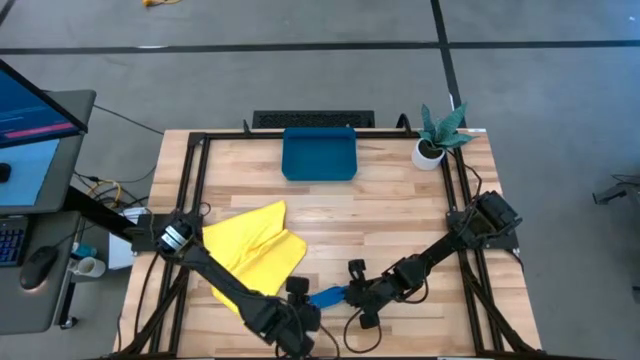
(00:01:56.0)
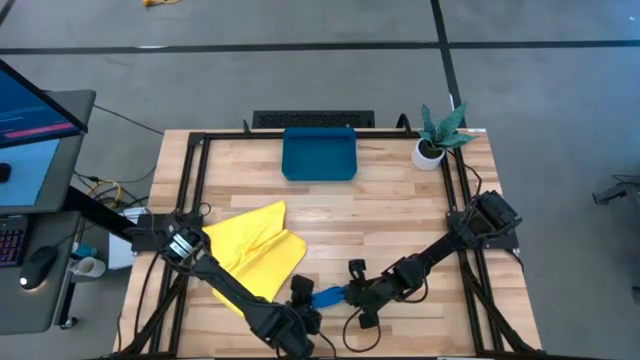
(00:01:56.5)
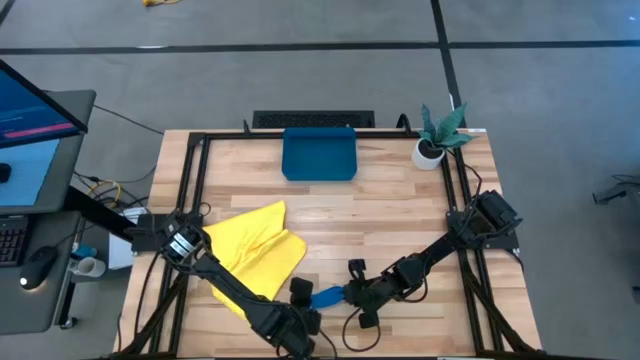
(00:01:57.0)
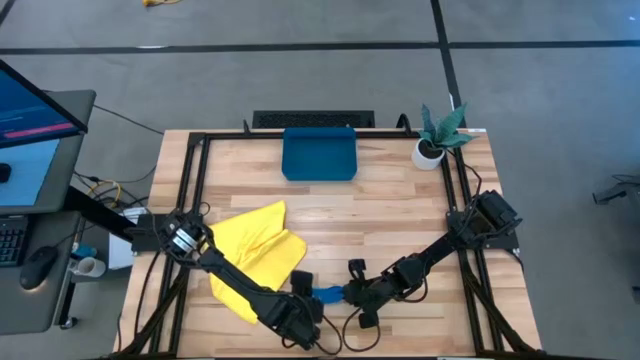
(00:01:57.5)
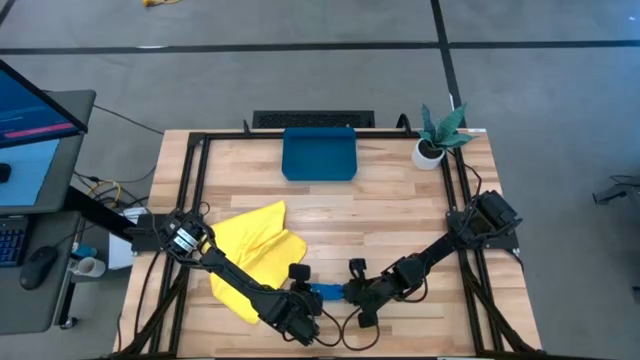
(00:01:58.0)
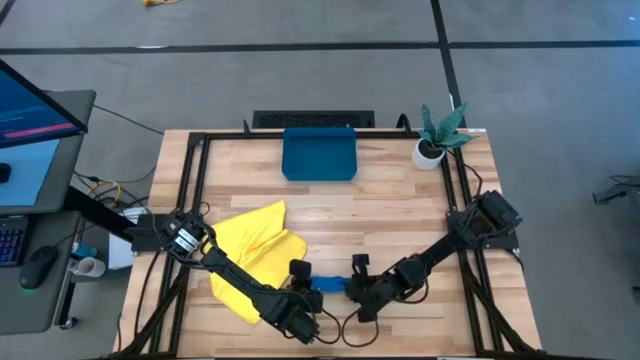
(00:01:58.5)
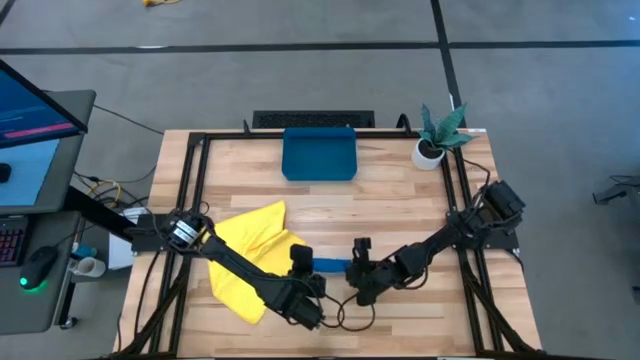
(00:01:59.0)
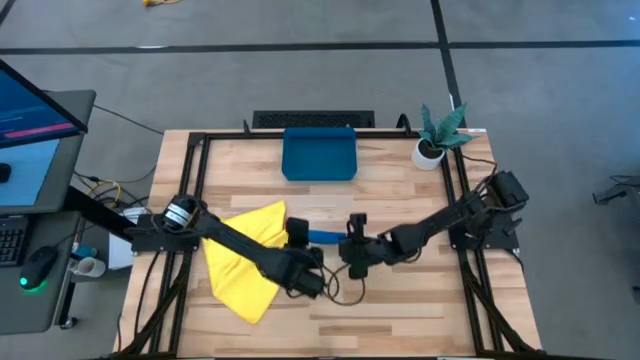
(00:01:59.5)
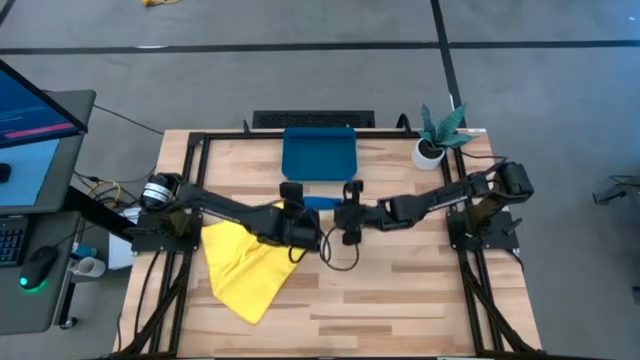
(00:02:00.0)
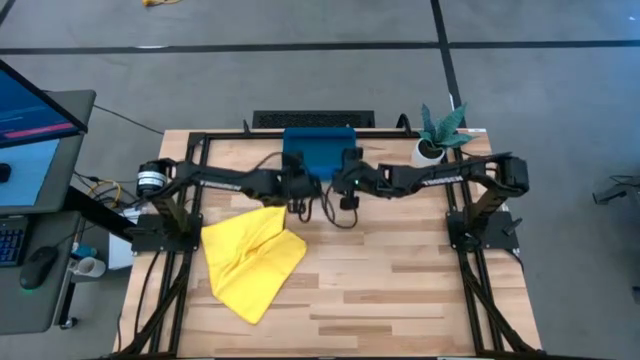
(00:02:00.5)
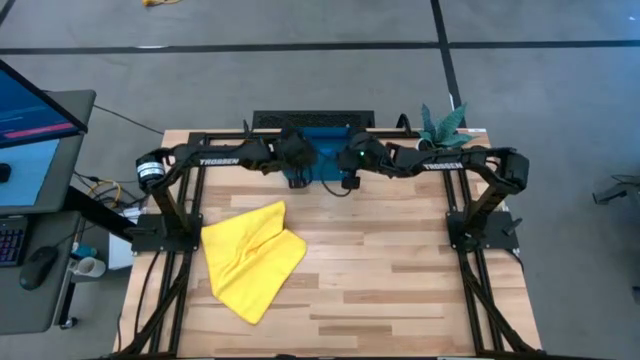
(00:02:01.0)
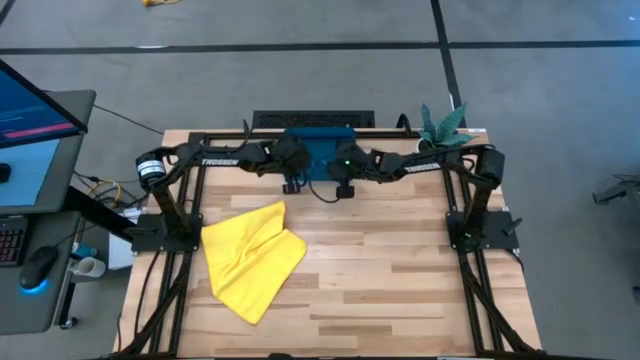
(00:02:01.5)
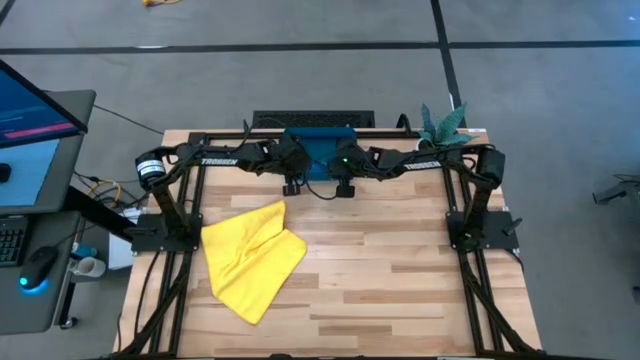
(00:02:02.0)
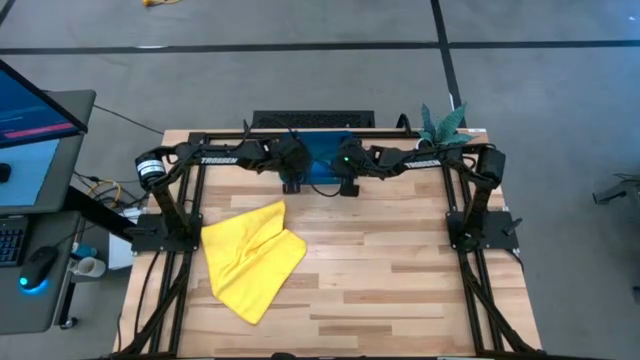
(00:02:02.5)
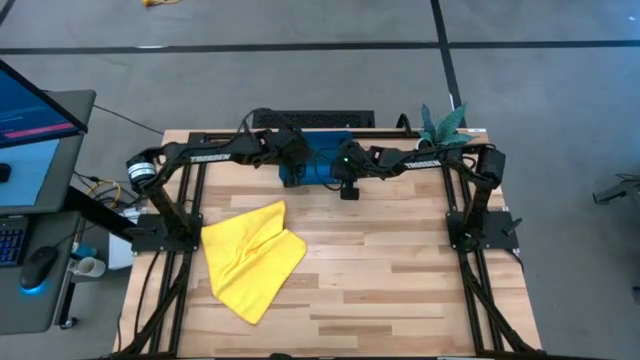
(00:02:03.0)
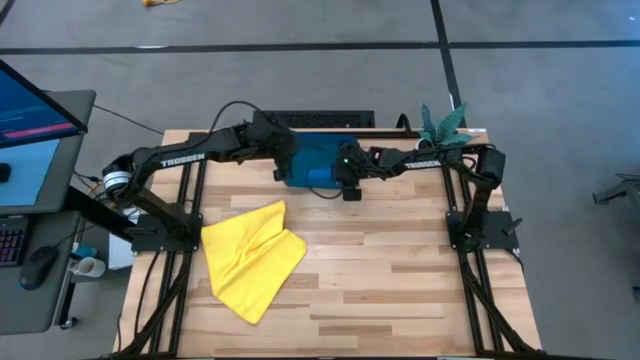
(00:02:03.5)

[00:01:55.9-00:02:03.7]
Task: Roll microfiber towels into tight, uniform cylinder then place into a basket
Put the rolled blue microfiber cloth into the blue bin
